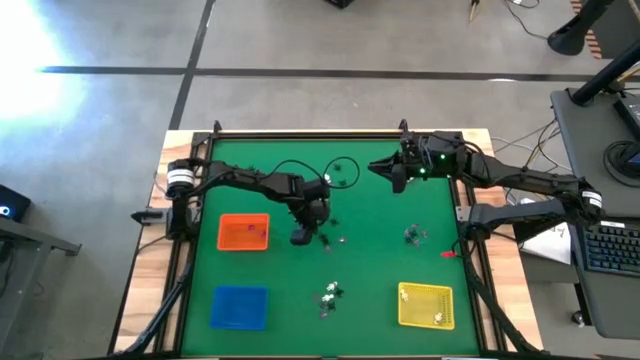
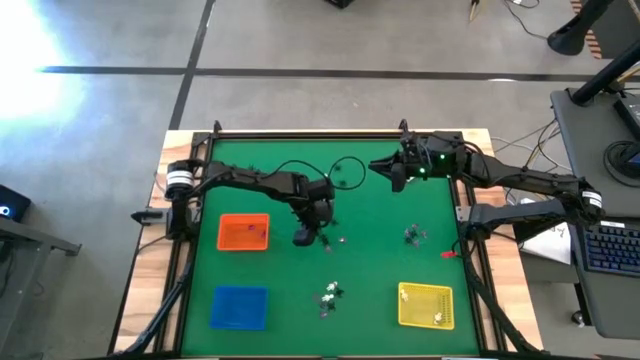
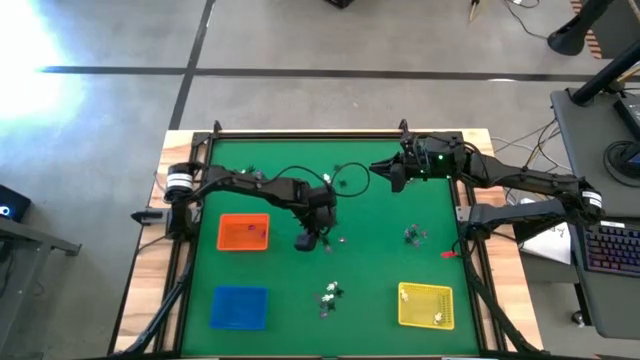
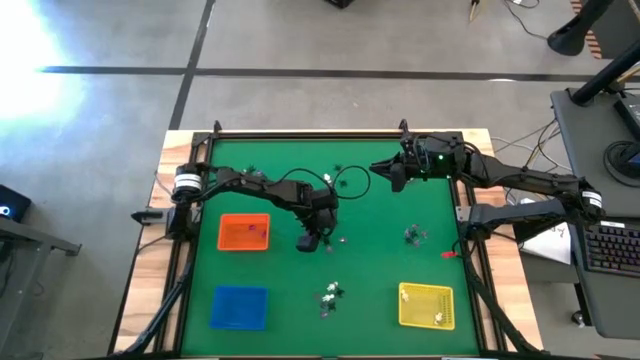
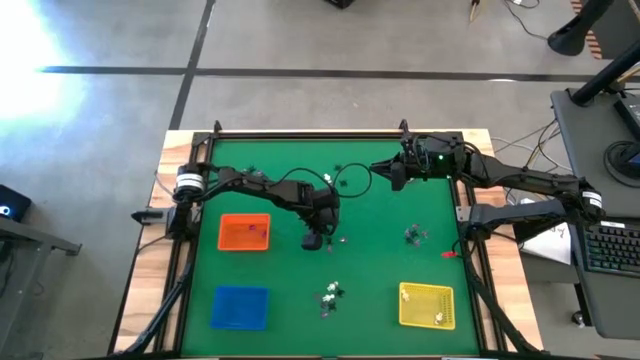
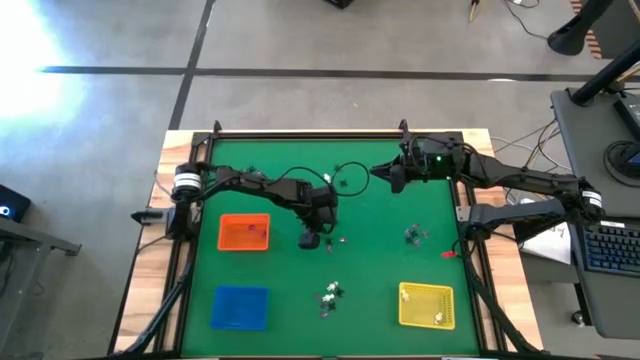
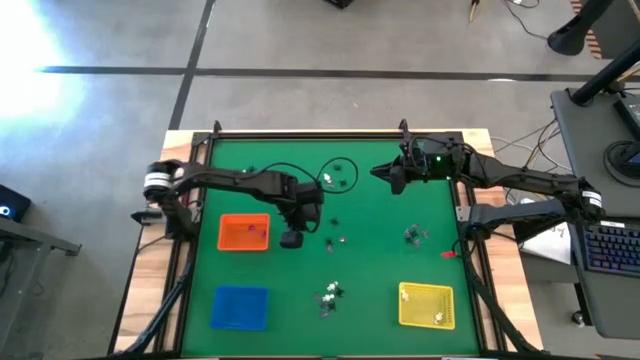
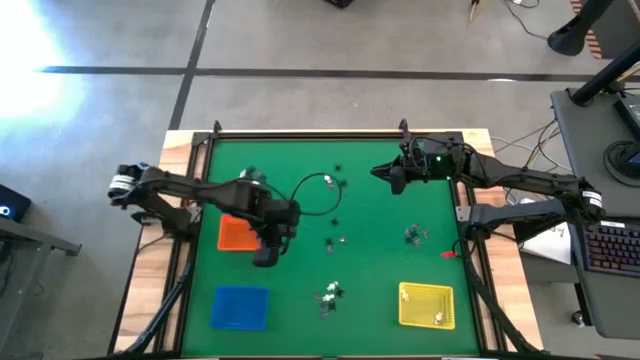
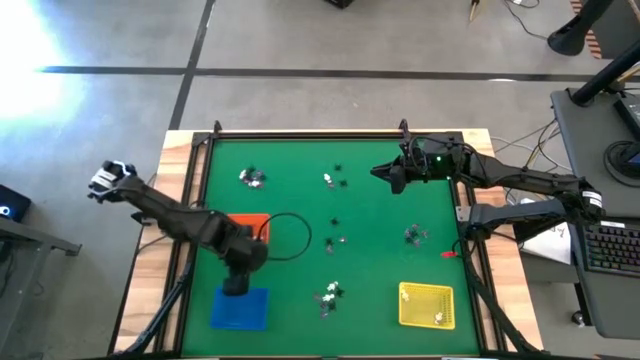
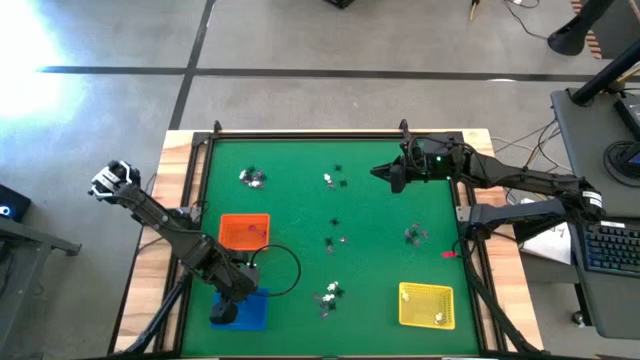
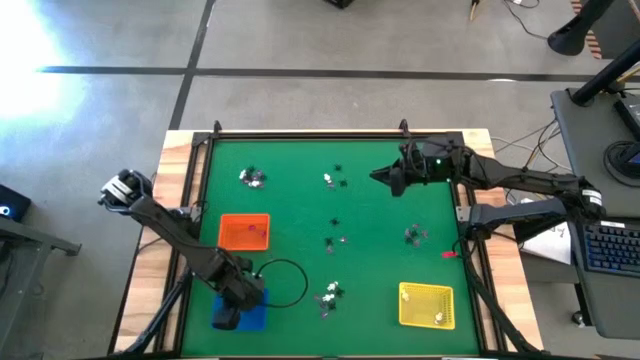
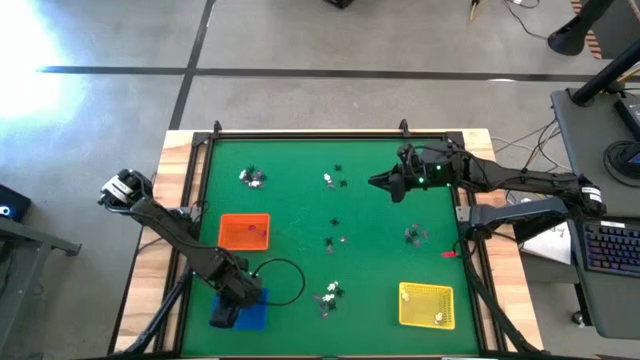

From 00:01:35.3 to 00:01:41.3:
Task: Sort Halloween decoration
Put the black spider toy into the blue bin

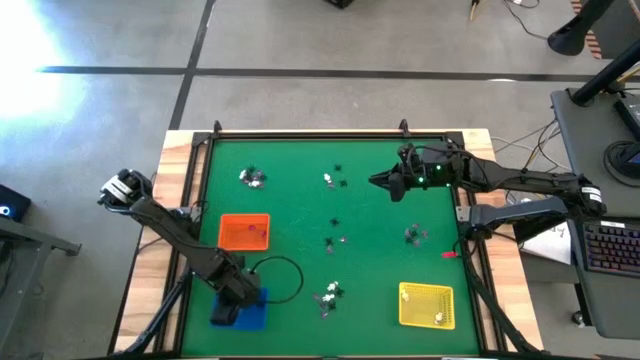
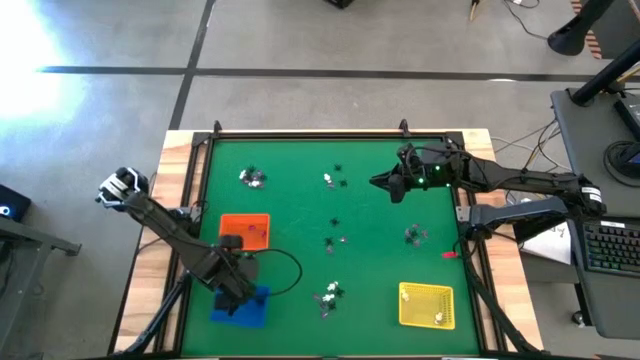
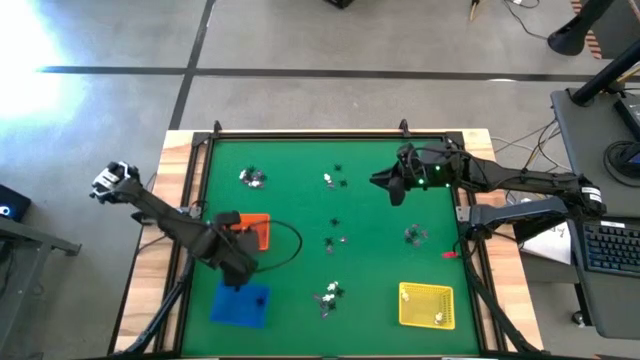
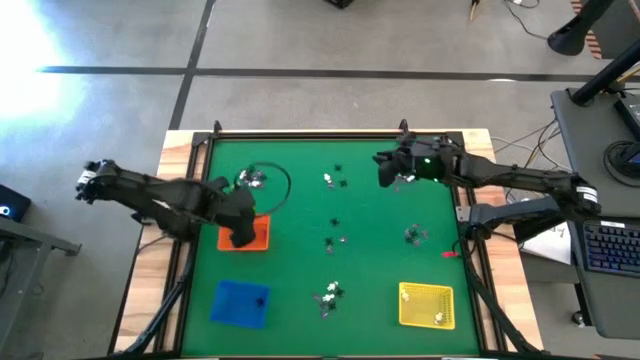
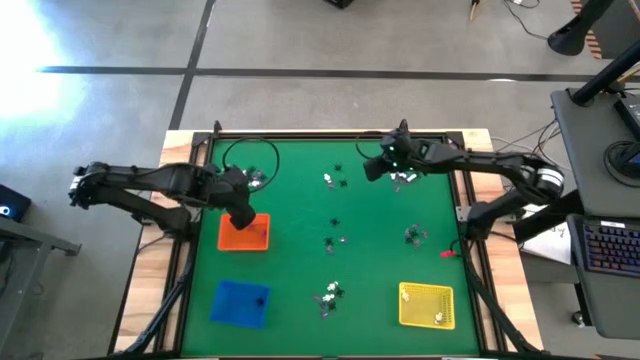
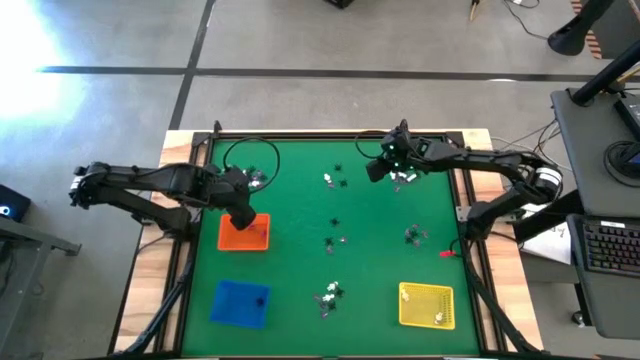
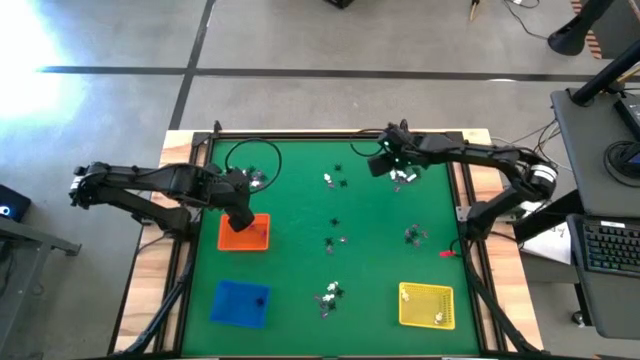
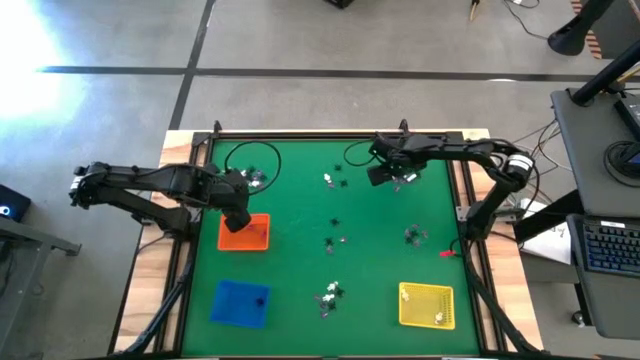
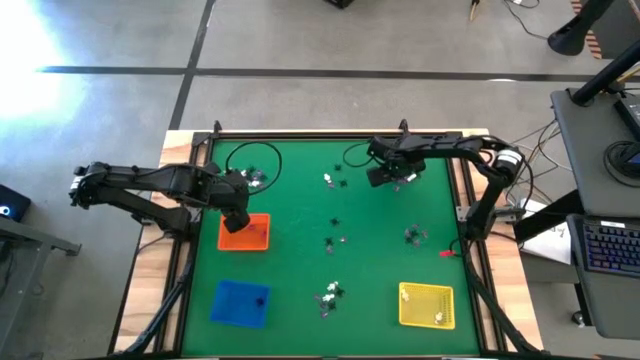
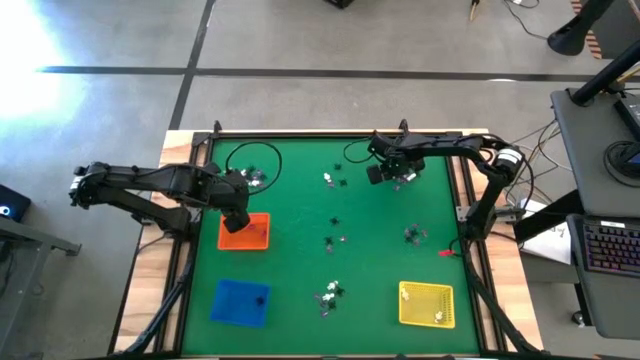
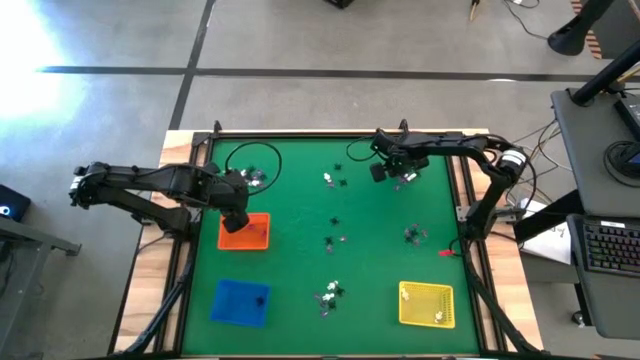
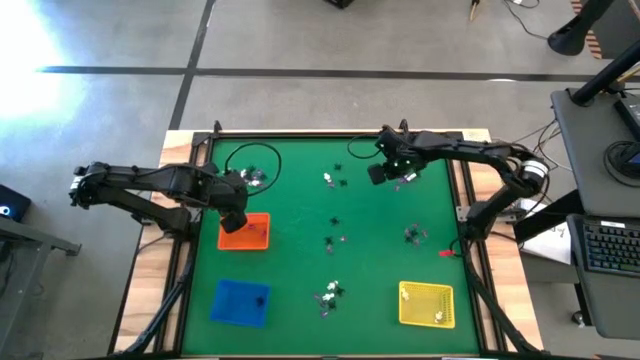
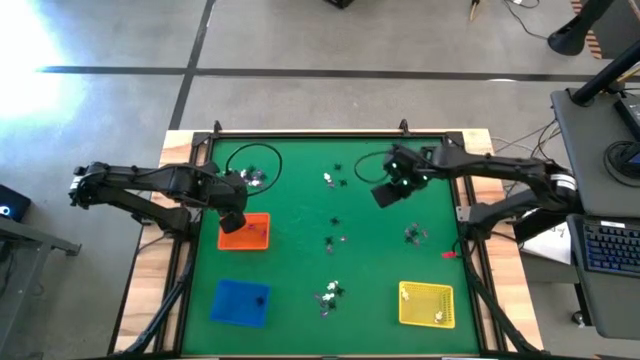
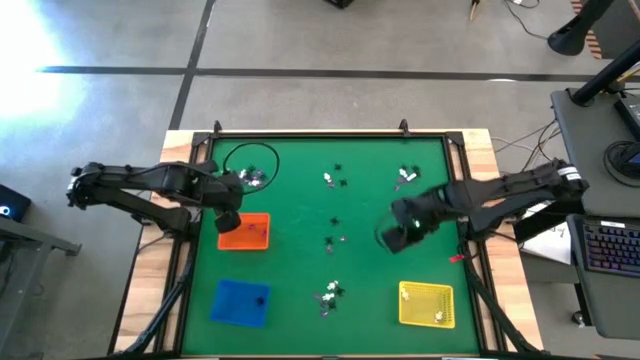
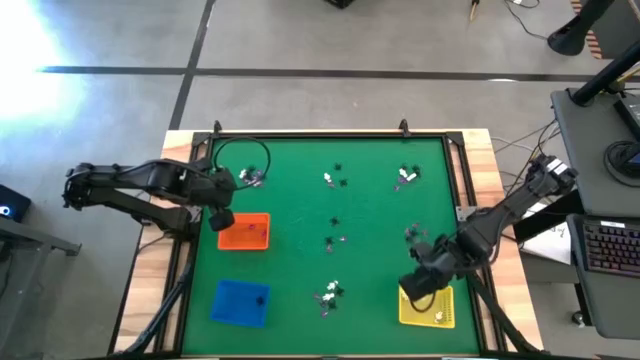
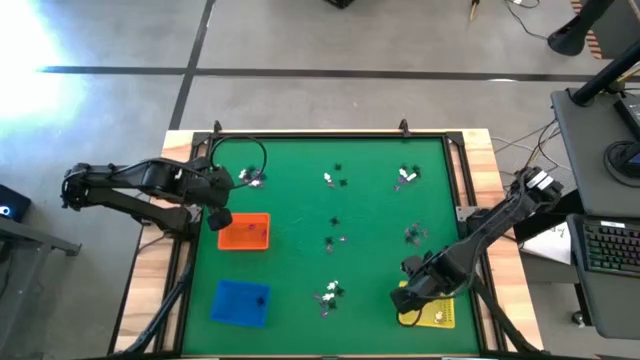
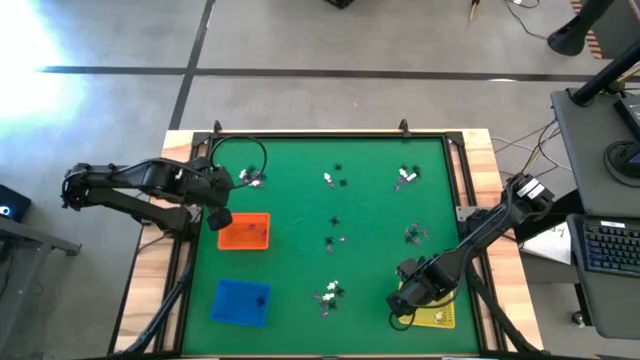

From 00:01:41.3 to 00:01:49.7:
Put the white skeleton toy into the yellow bin

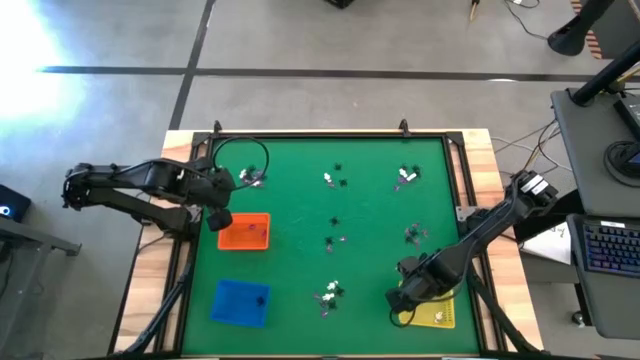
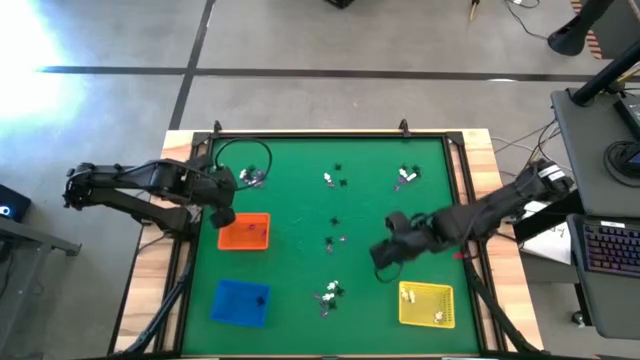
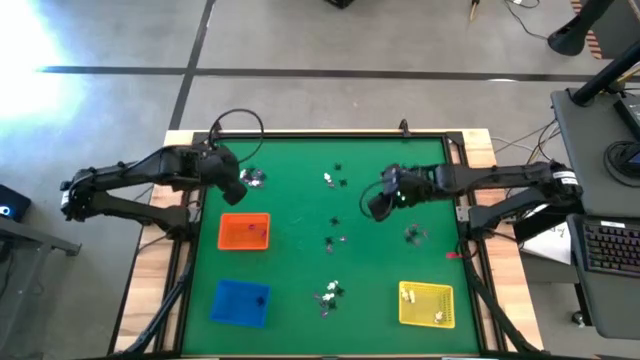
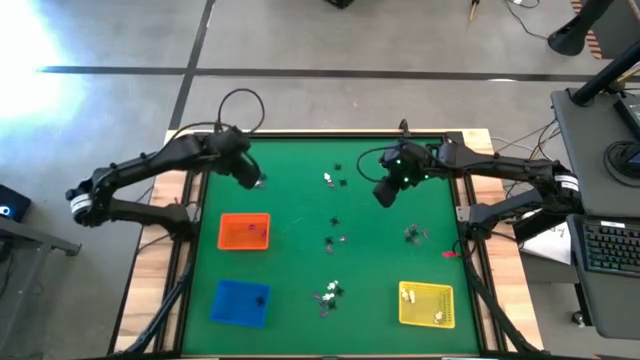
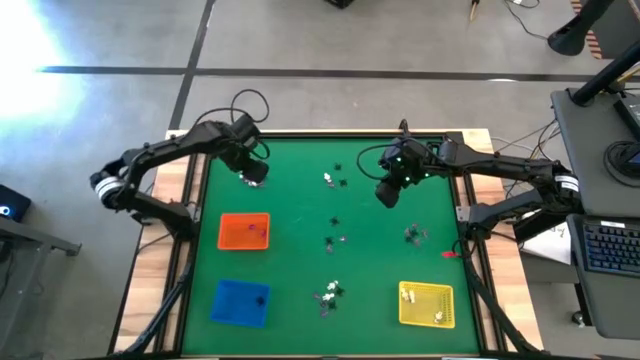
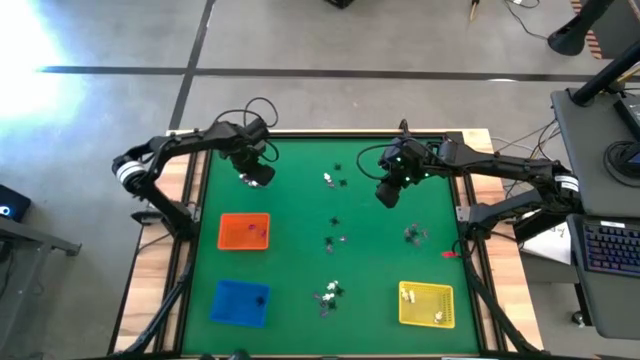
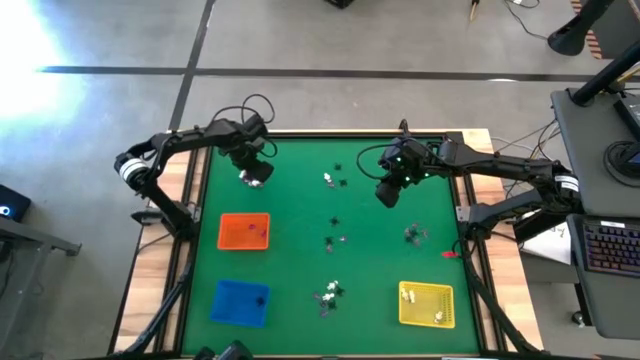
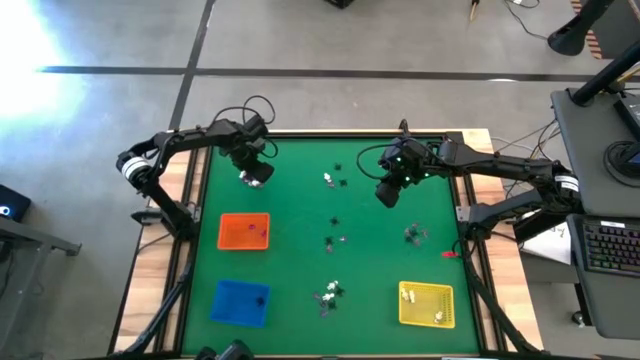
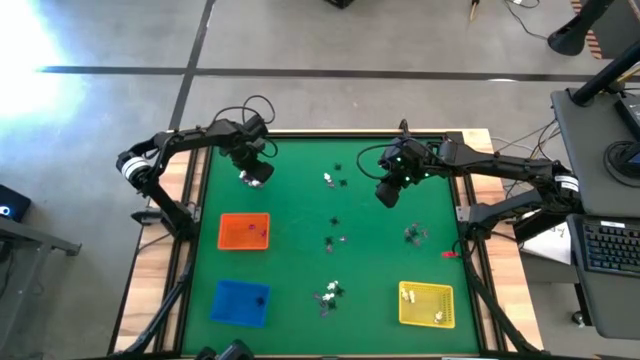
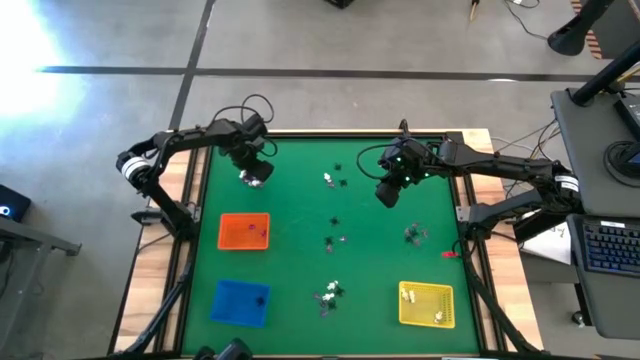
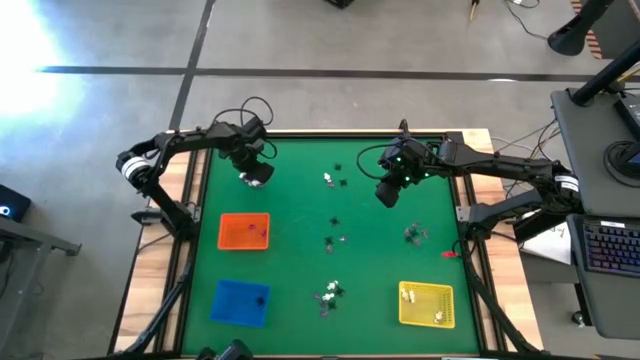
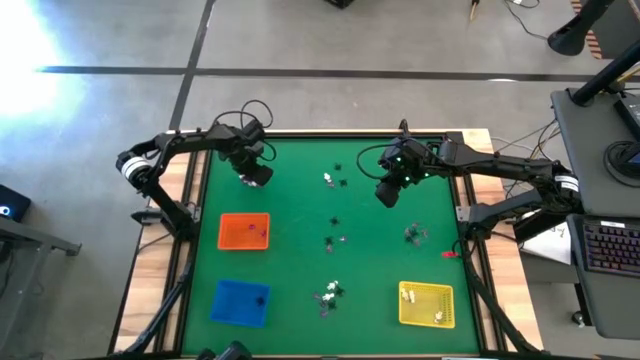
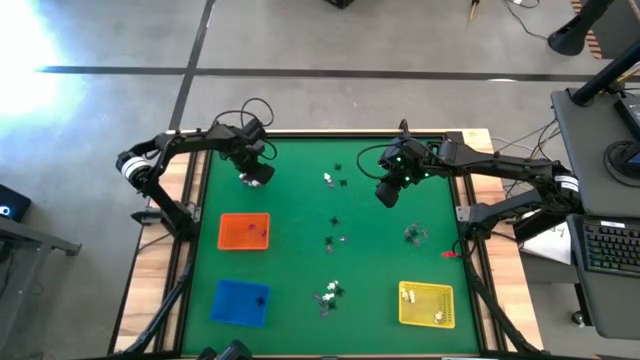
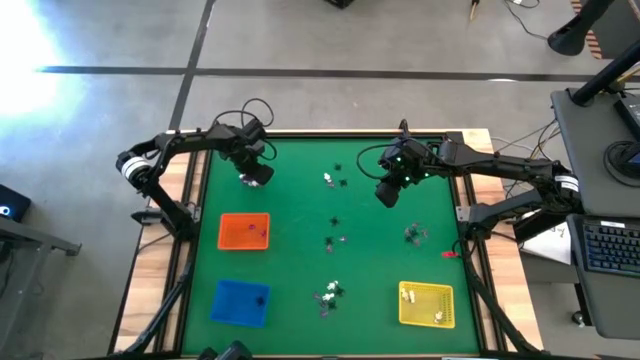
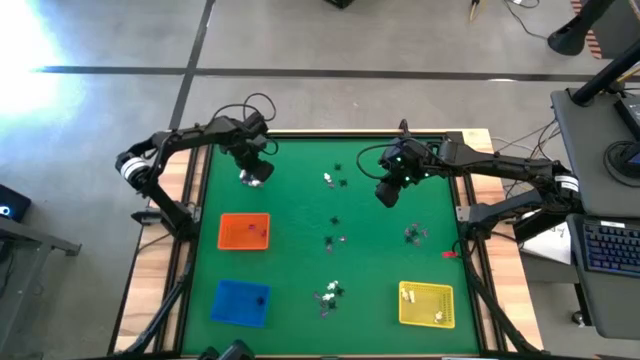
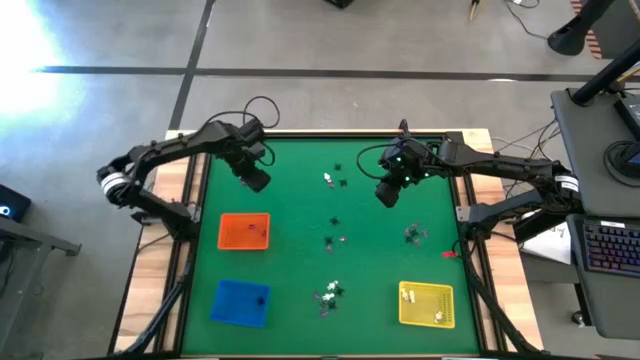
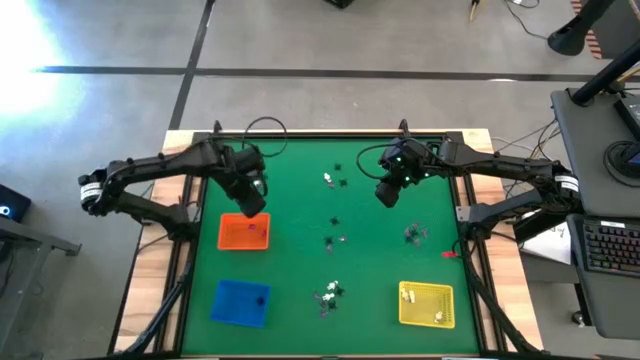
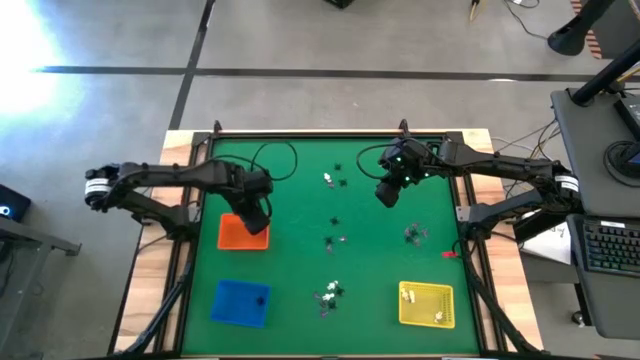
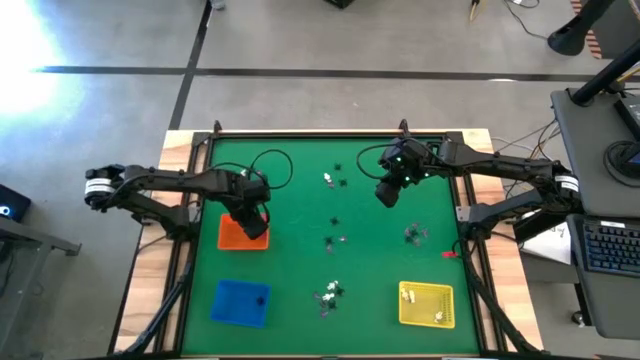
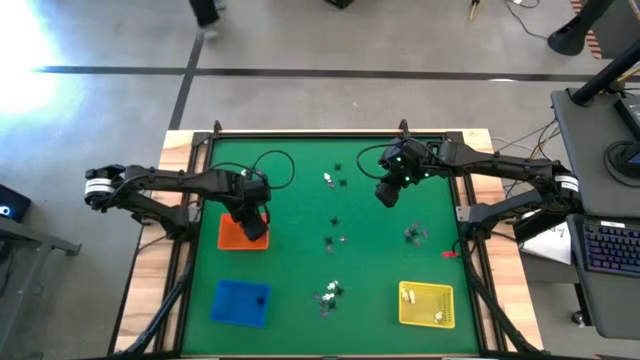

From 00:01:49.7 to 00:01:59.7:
Put the violet witch hat toy into the orange bin
